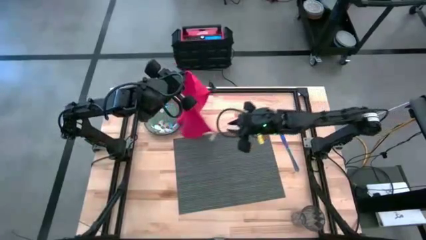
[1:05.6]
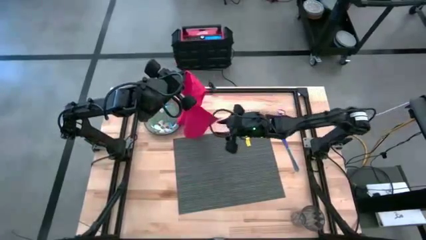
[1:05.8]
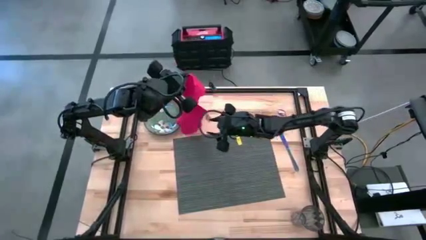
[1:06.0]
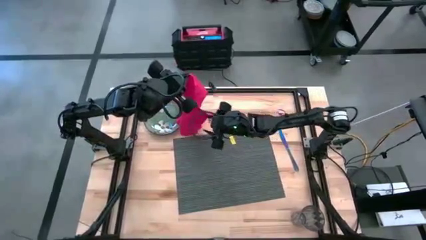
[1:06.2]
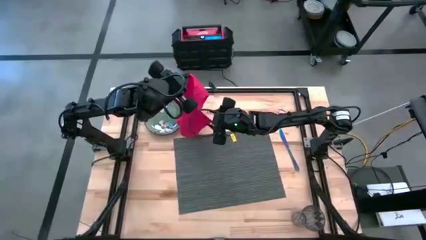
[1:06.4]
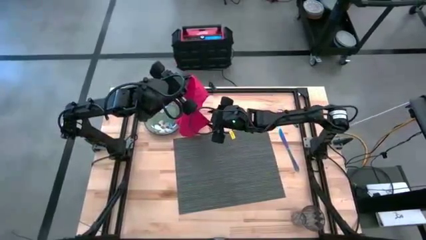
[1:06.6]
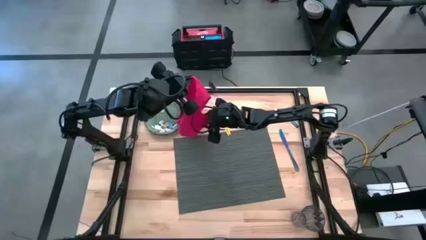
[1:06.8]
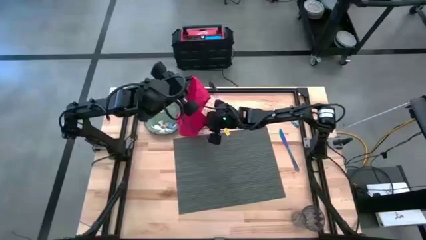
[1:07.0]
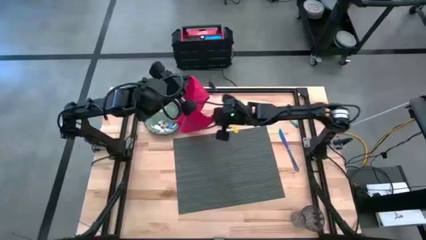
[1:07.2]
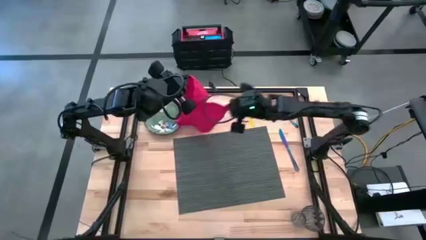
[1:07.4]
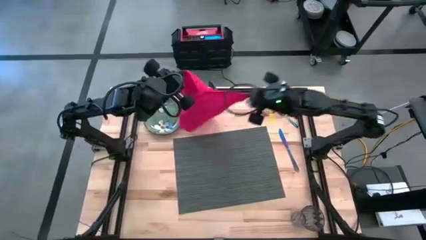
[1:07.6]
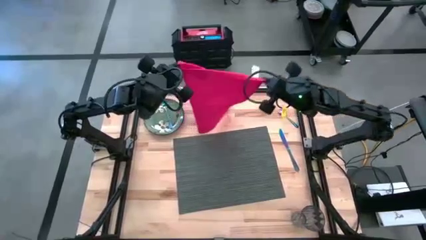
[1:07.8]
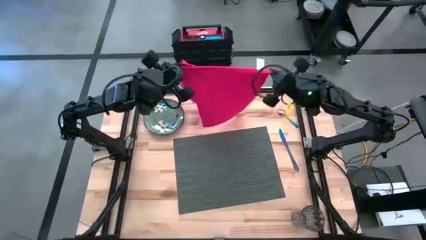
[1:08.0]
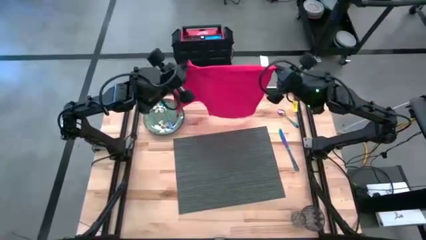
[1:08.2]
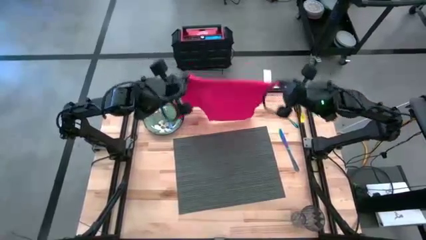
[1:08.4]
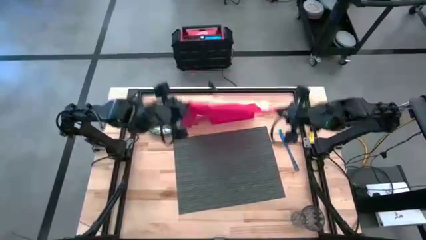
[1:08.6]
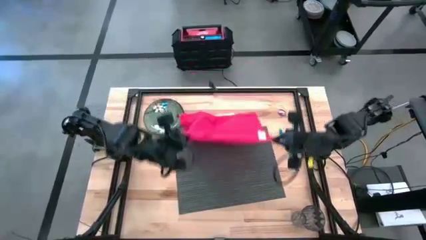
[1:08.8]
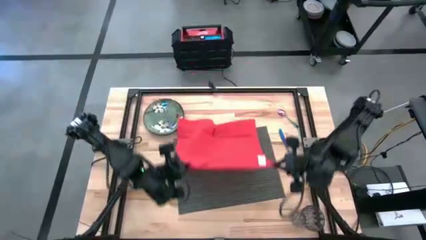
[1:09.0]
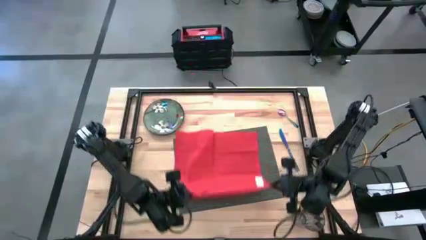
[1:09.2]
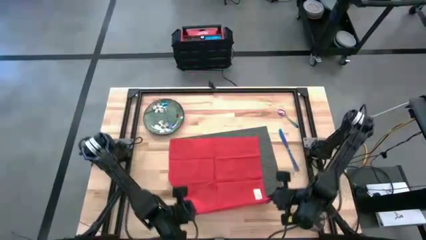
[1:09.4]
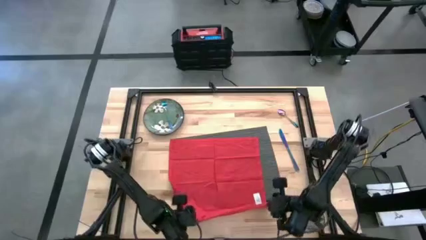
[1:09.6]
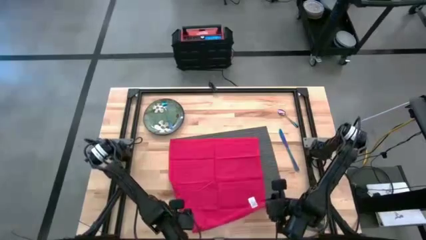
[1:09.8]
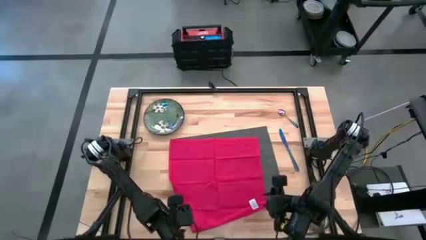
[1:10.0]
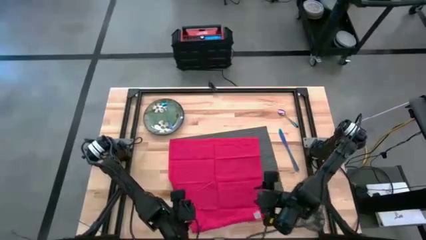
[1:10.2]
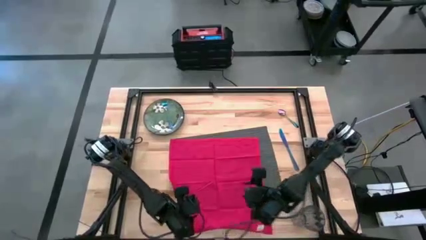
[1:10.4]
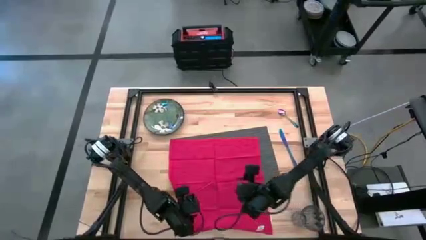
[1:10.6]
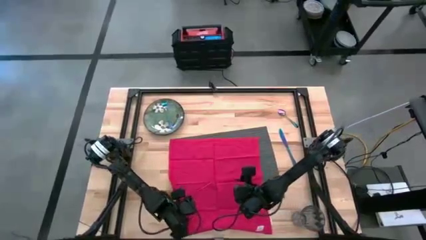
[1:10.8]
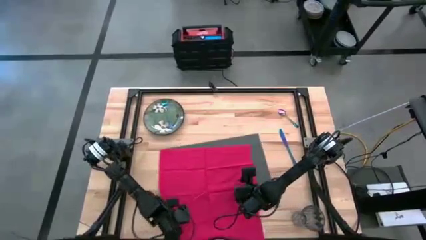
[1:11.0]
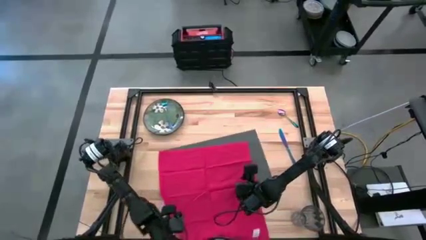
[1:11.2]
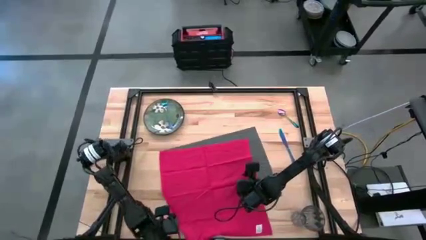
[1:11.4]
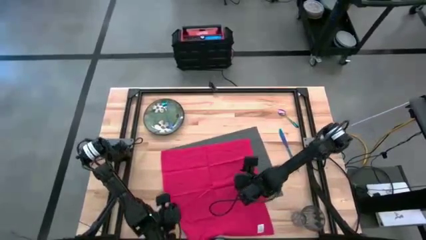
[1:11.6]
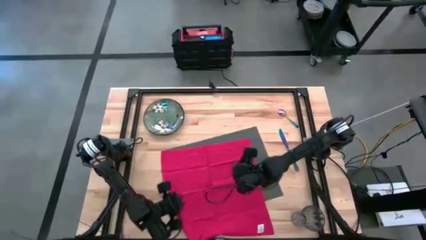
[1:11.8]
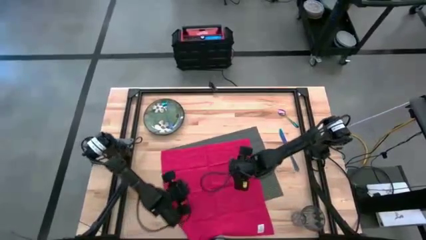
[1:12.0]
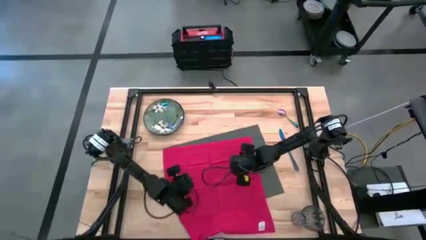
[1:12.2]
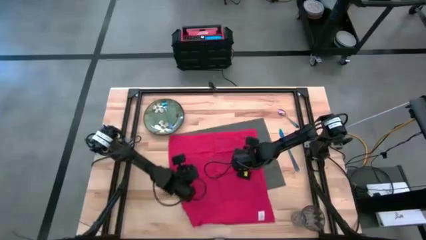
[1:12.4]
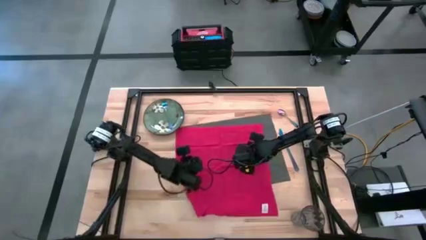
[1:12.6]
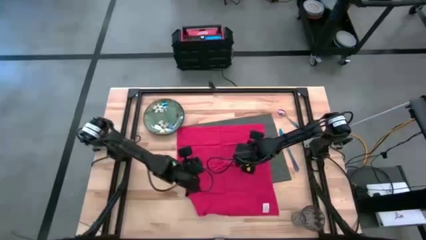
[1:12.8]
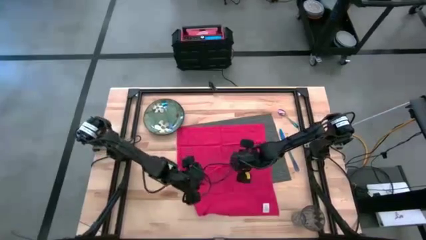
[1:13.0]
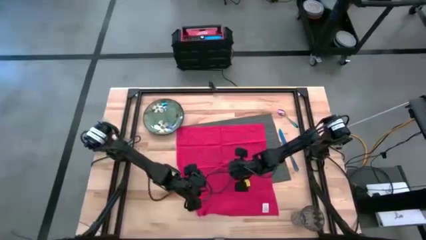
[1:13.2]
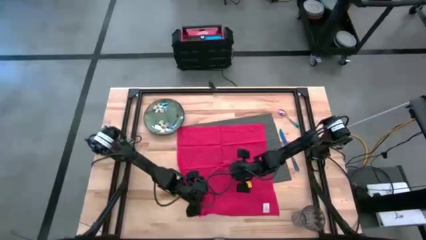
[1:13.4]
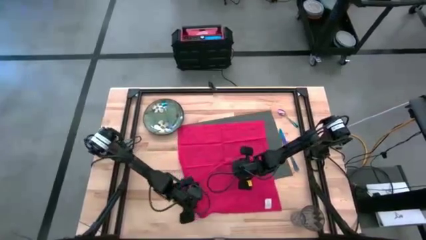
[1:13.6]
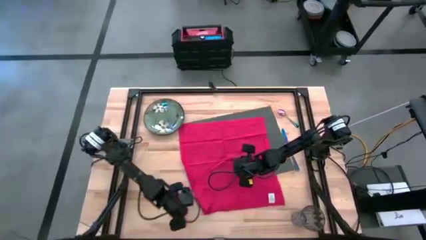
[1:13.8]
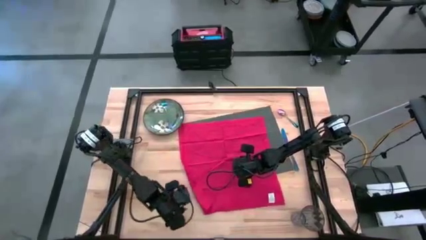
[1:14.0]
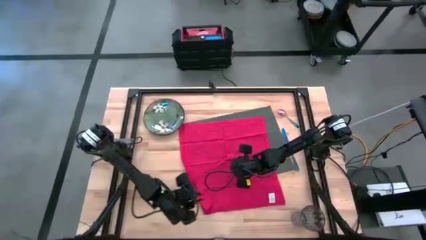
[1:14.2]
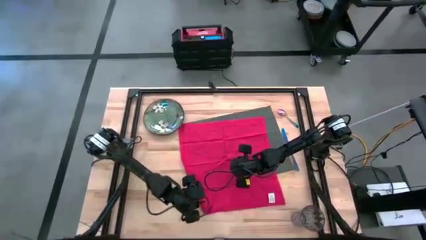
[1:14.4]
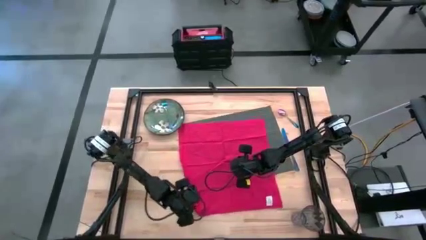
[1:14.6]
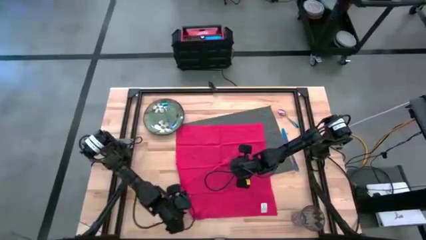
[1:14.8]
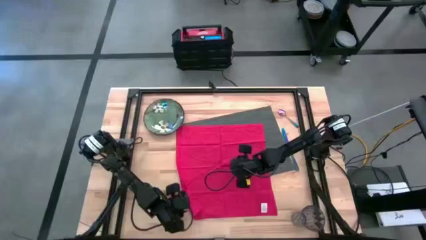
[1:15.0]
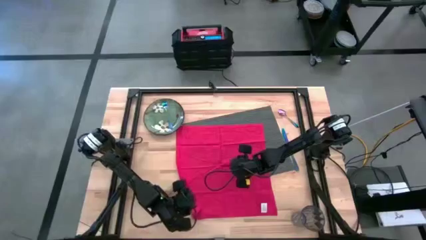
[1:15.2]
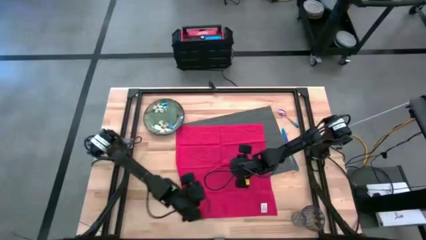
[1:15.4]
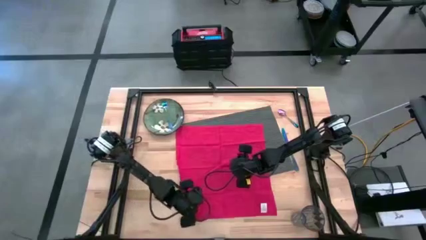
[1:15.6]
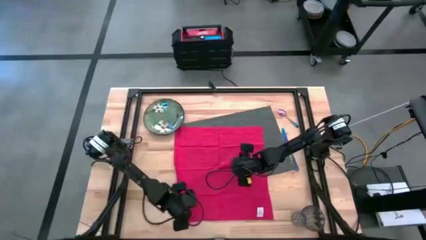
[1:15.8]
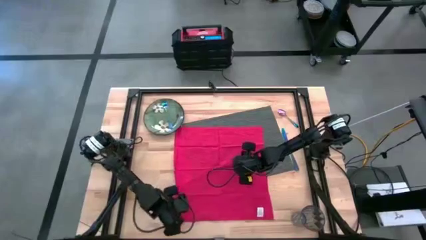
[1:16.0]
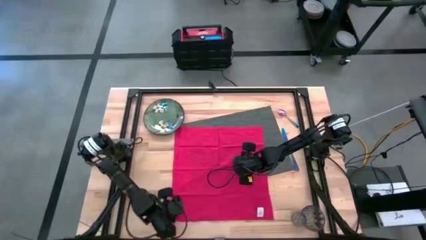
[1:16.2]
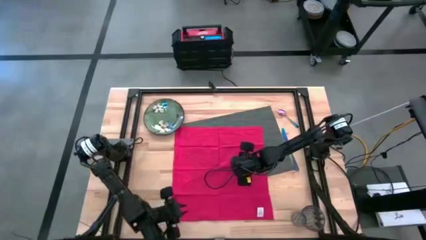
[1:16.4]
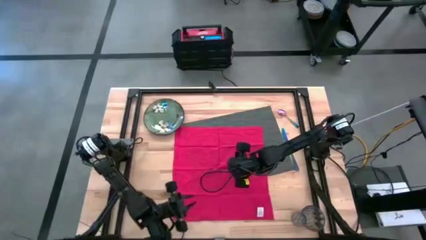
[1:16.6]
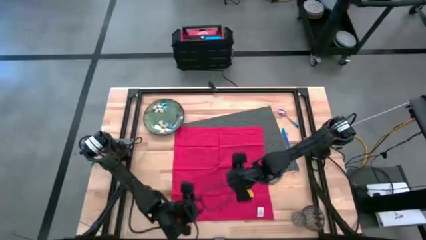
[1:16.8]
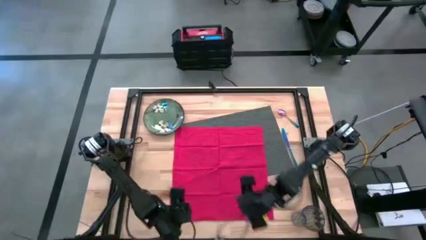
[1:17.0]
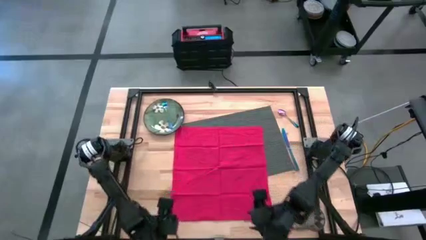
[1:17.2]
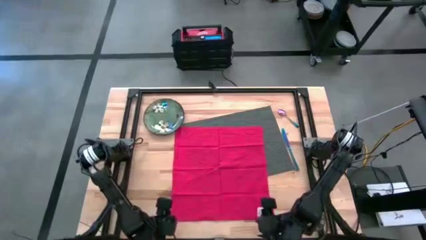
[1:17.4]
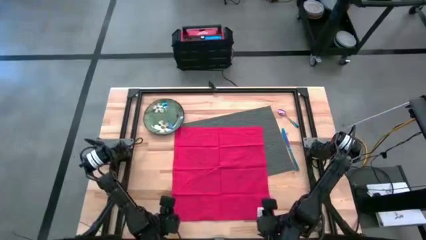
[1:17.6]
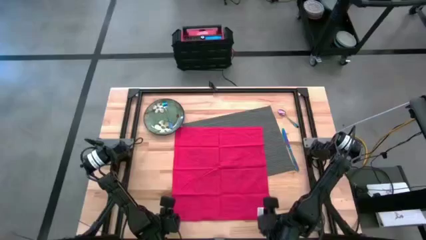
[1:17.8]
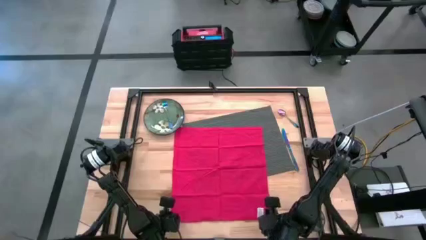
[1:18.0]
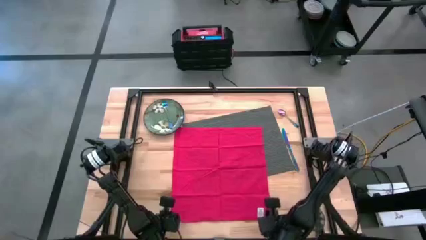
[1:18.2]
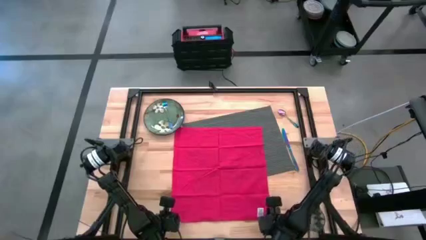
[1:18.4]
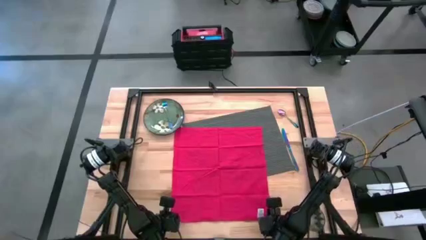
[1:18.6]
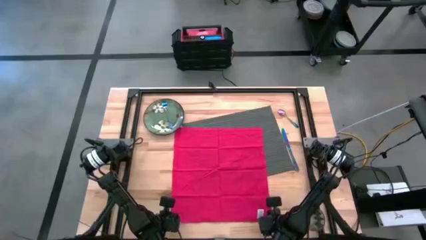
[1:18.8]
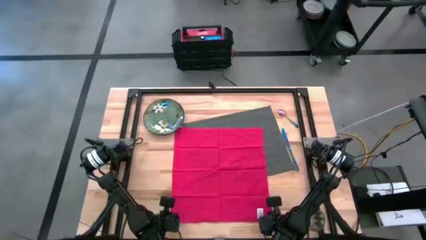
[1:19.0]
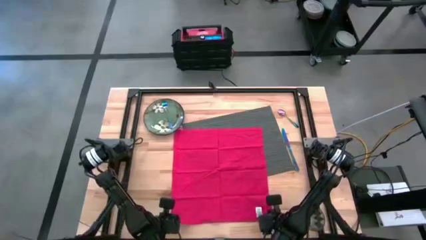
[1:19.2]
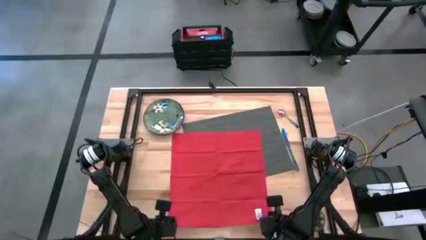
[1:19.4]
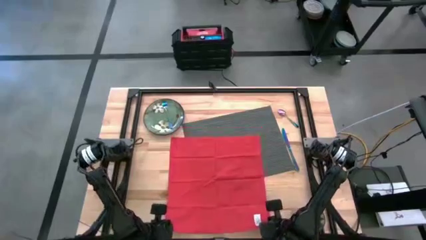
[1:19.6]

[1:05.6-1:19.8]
Task: Set table place
Fold the red table napkin

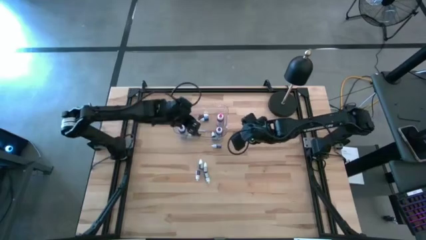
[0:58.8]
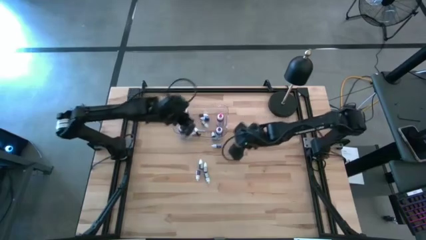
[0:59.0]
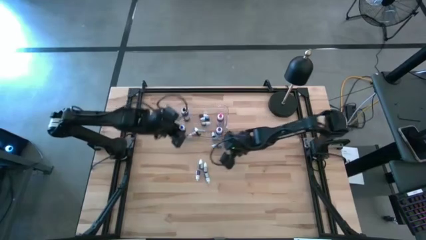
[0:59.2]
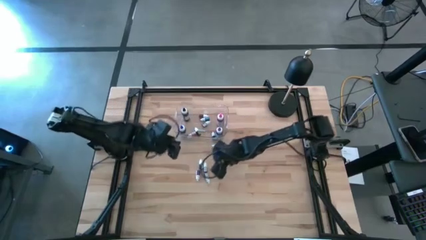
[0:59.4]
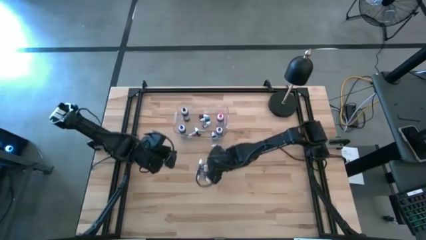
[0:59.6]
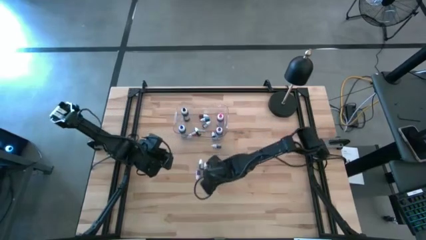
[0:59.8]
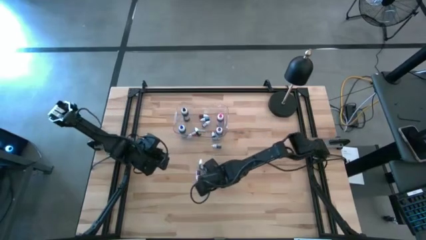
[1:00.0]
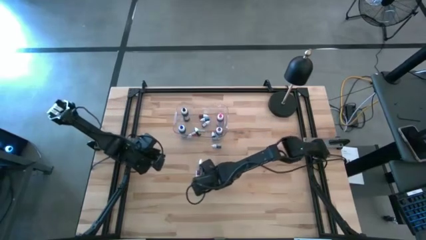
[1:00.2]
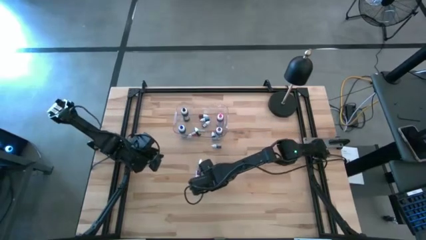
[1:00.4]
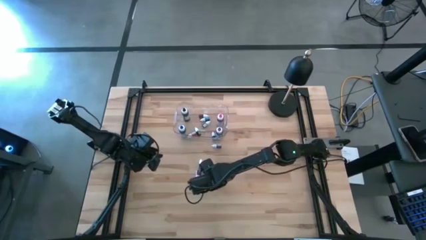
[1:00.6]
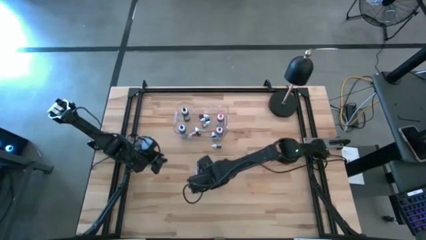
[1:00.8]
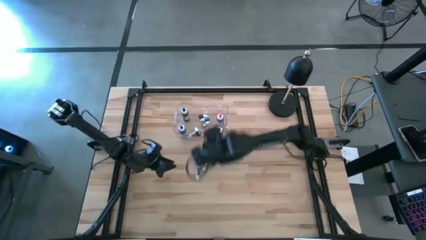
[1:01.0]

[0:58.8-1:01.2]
Task: Pick & Place food coloring
Put the small green food coloring bottle into the transparent bin
